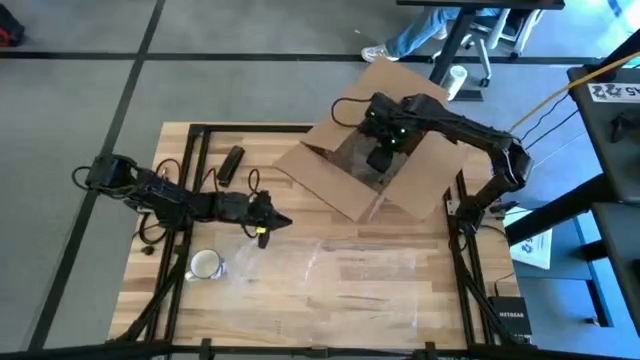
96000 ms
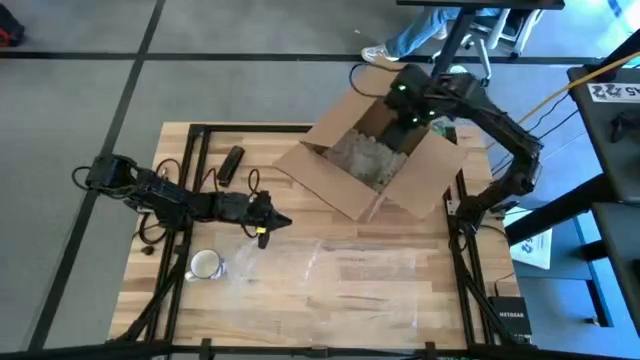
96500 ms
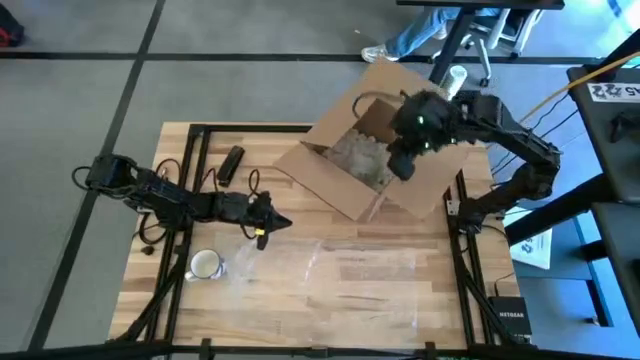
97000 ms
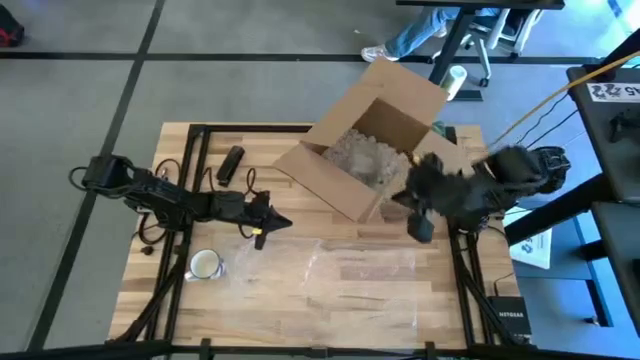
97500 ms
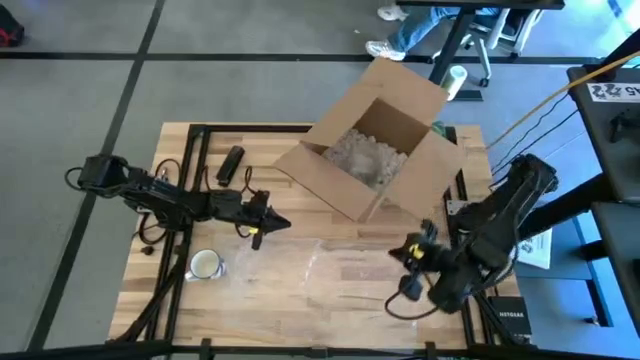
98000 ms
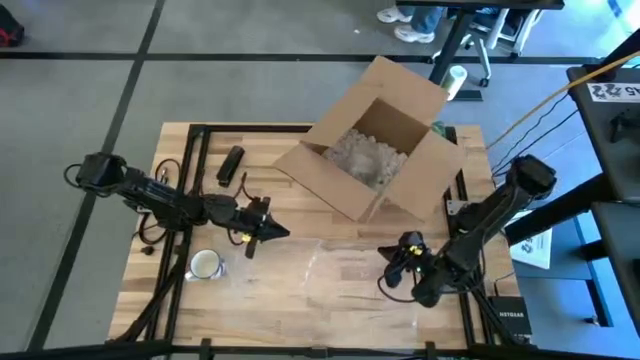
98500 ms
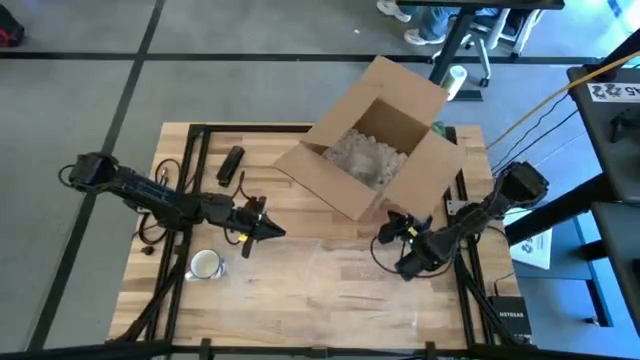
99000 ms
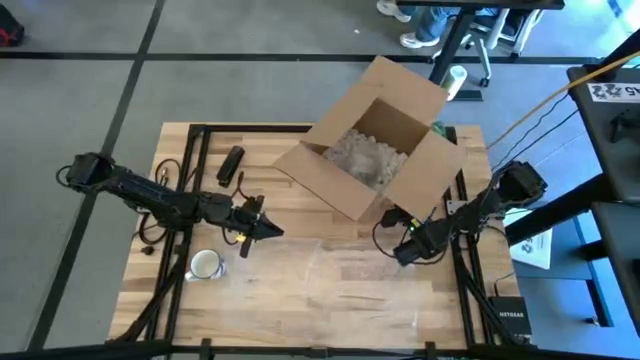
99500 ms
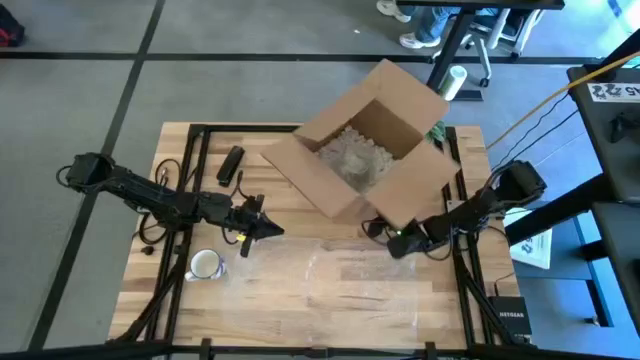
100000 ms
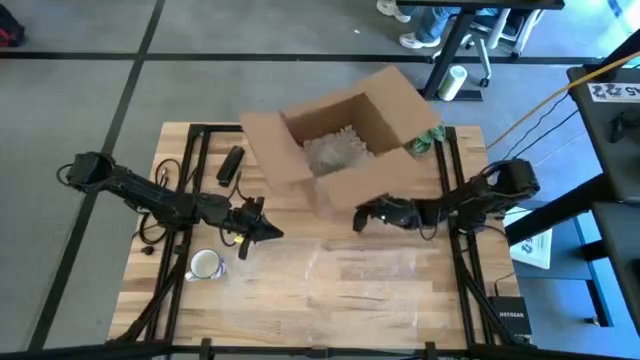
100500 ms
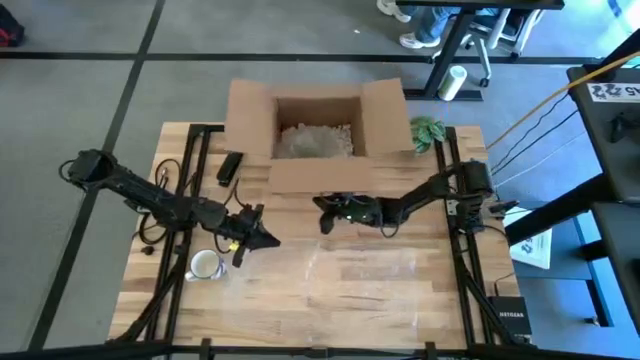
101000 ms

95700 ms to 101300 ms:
Task: wrap mug
Adjust the cardboard box

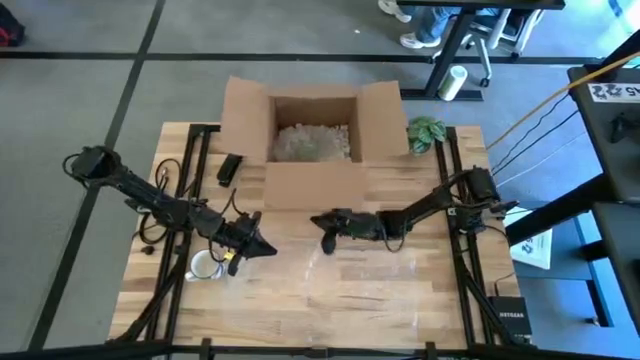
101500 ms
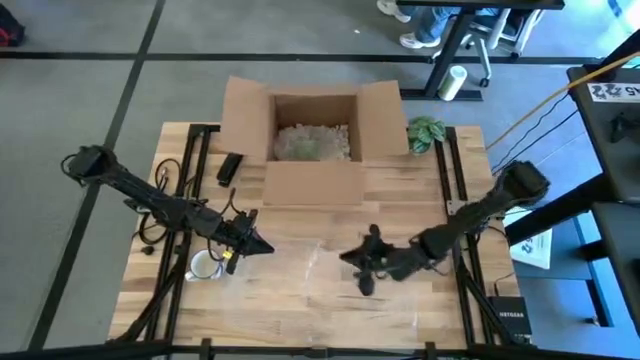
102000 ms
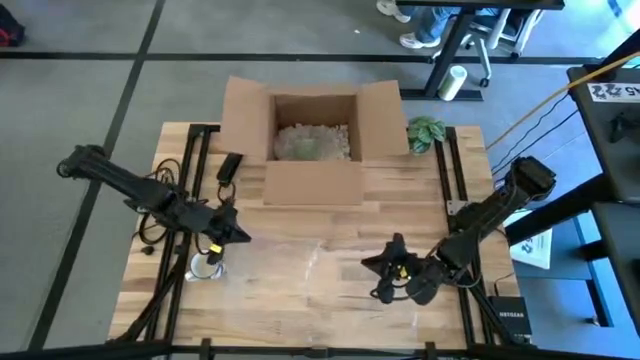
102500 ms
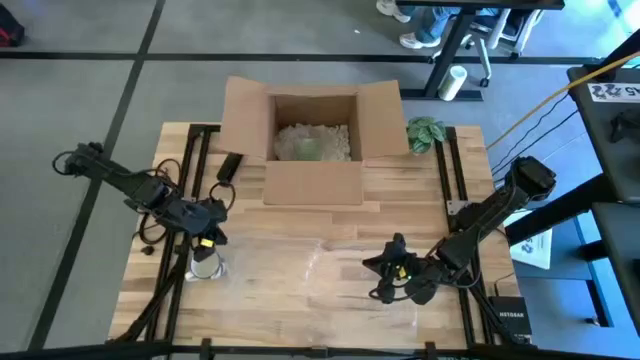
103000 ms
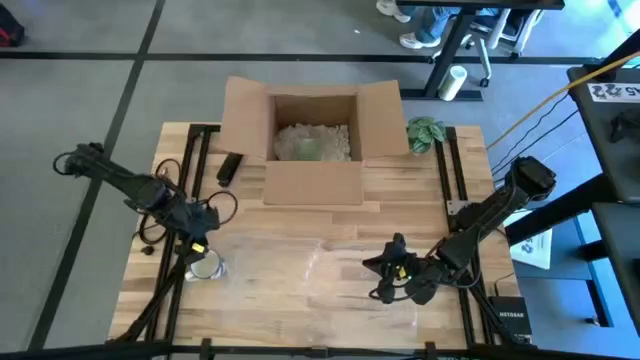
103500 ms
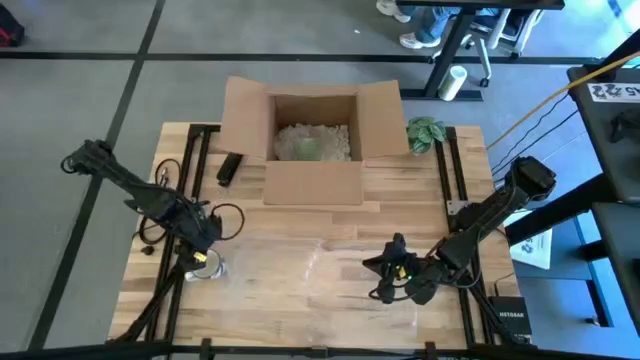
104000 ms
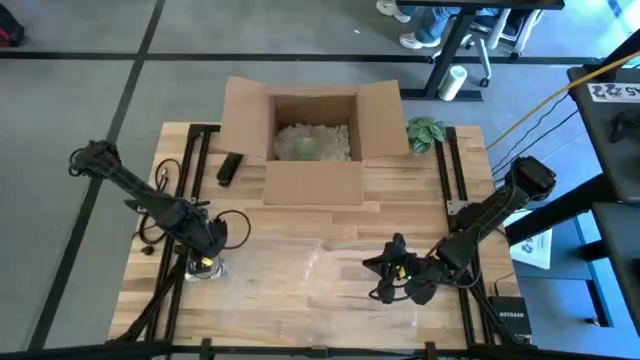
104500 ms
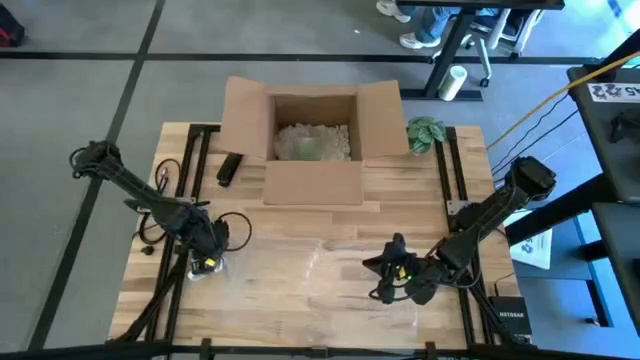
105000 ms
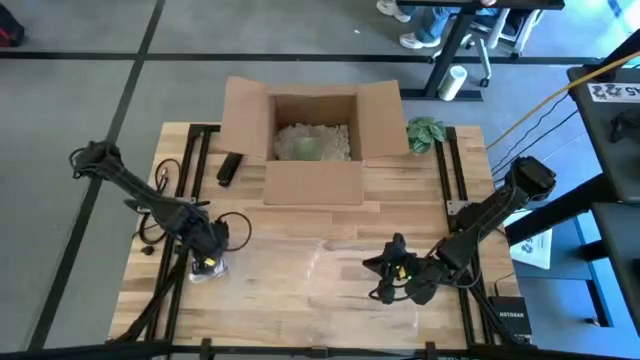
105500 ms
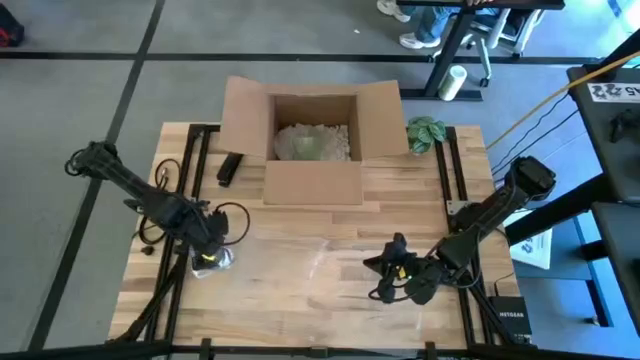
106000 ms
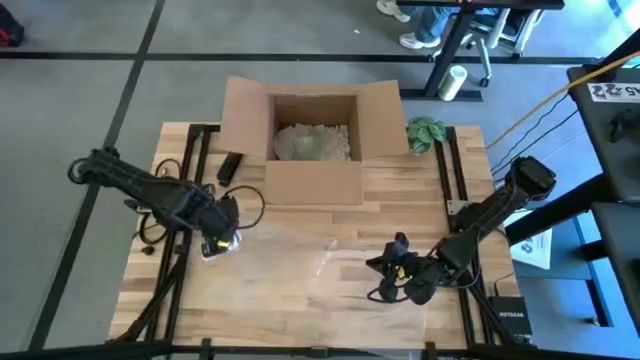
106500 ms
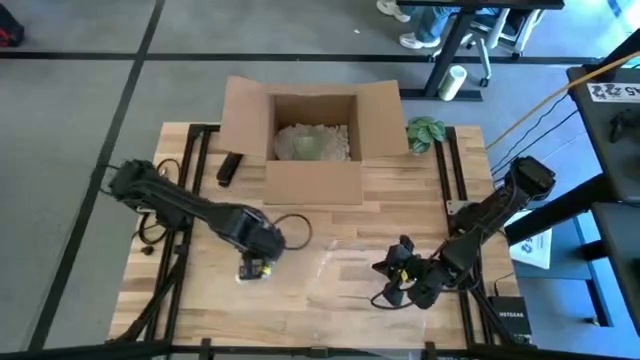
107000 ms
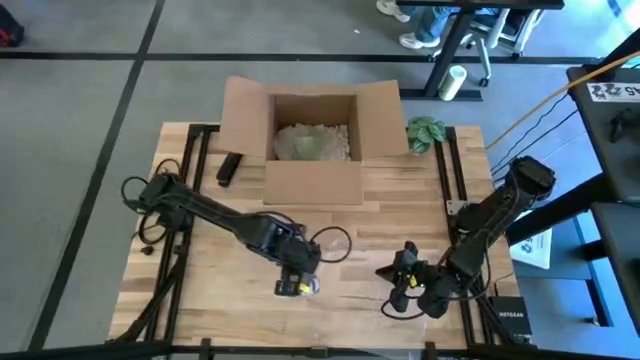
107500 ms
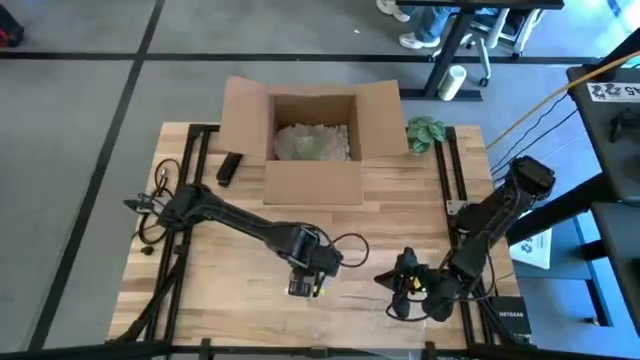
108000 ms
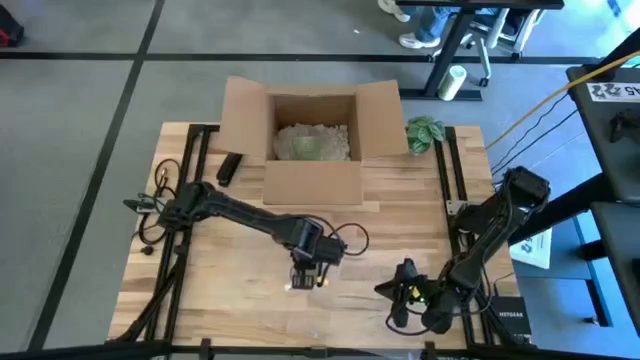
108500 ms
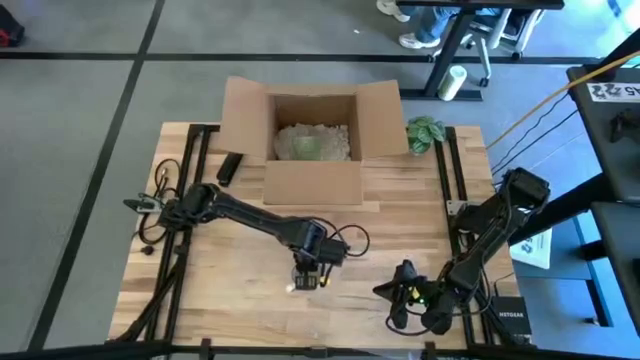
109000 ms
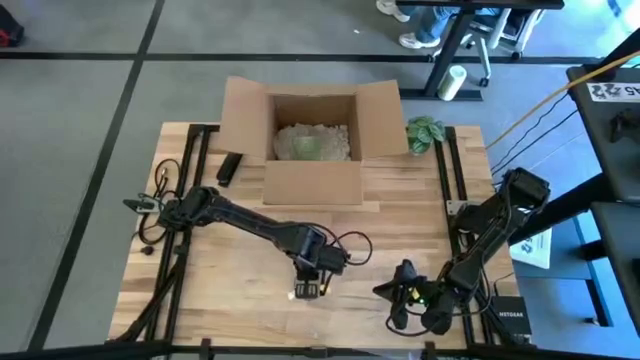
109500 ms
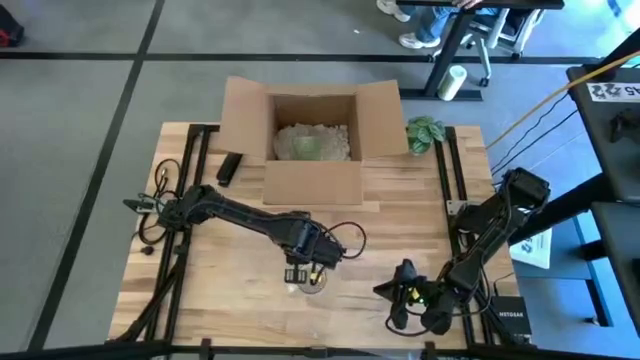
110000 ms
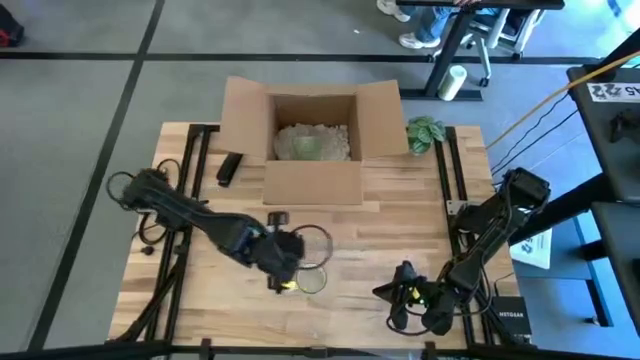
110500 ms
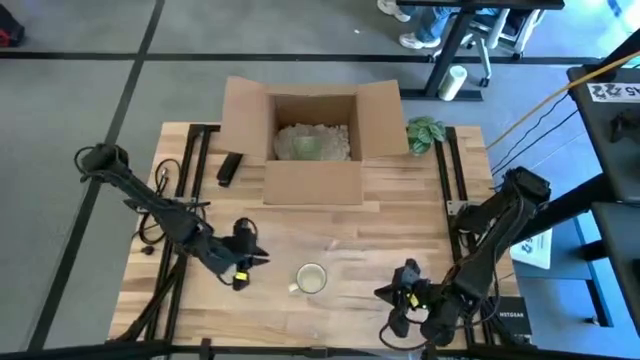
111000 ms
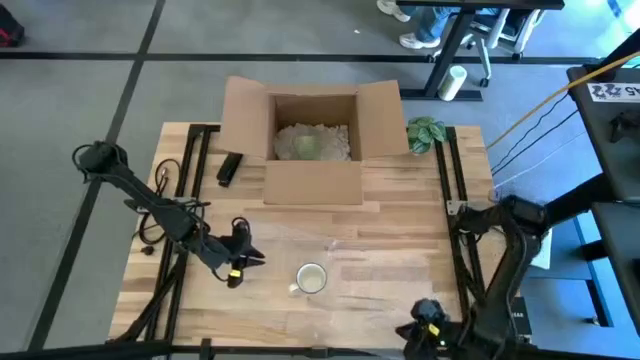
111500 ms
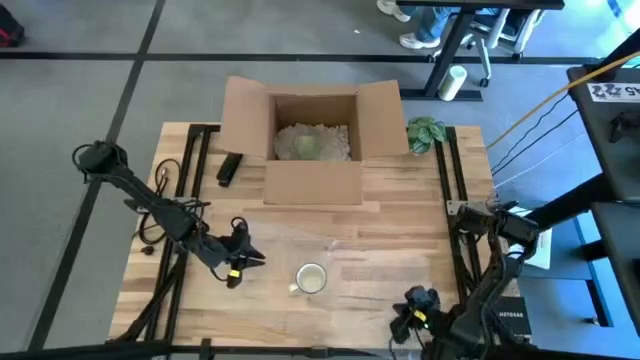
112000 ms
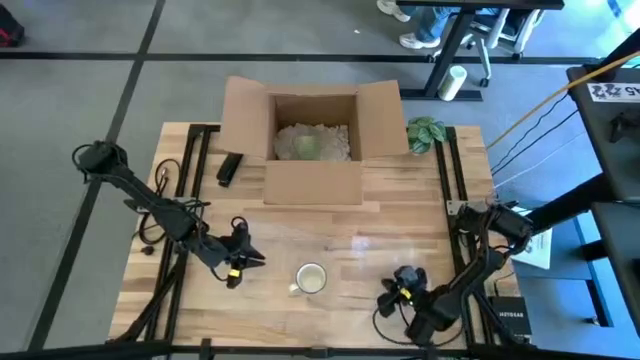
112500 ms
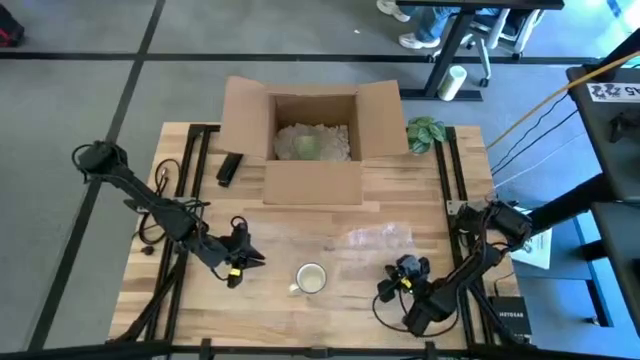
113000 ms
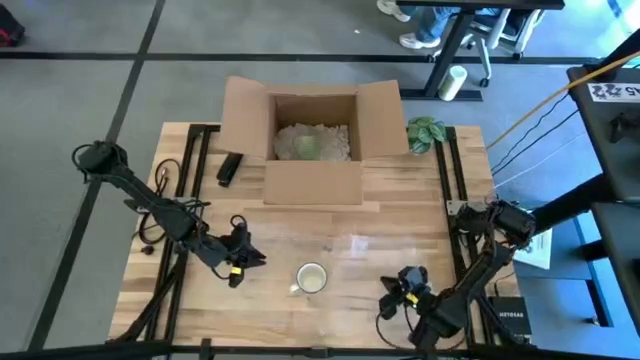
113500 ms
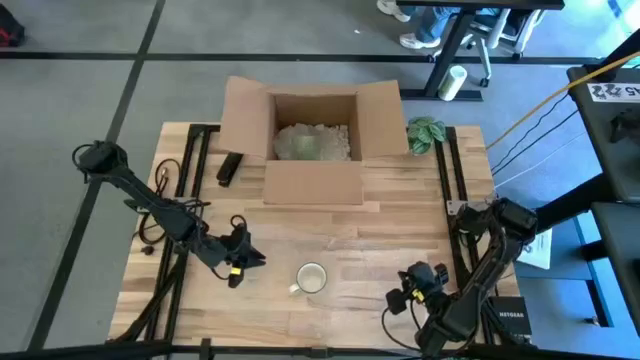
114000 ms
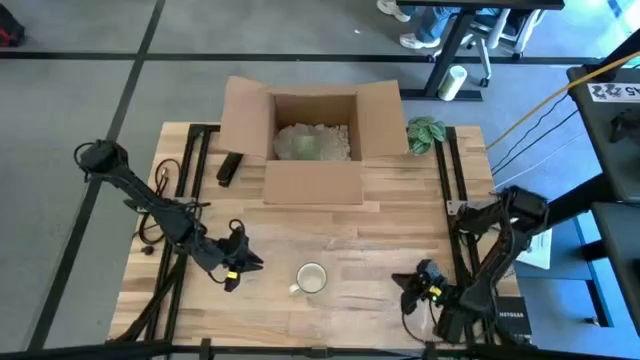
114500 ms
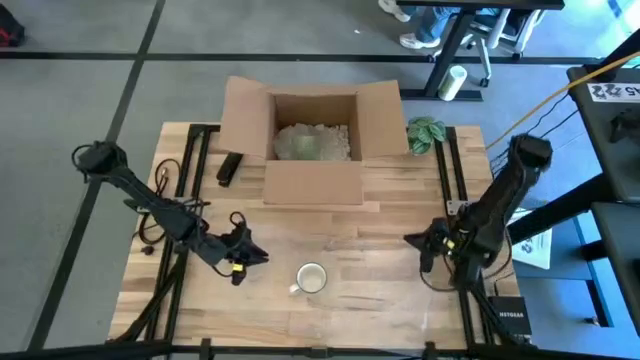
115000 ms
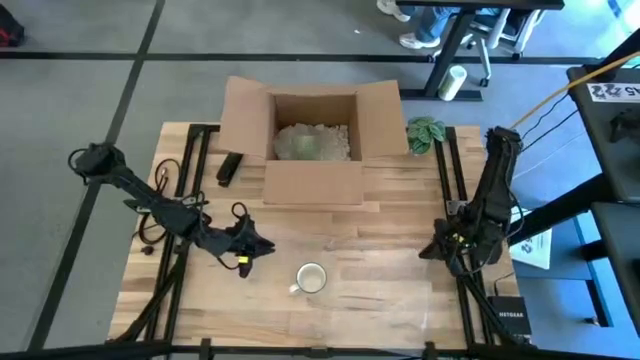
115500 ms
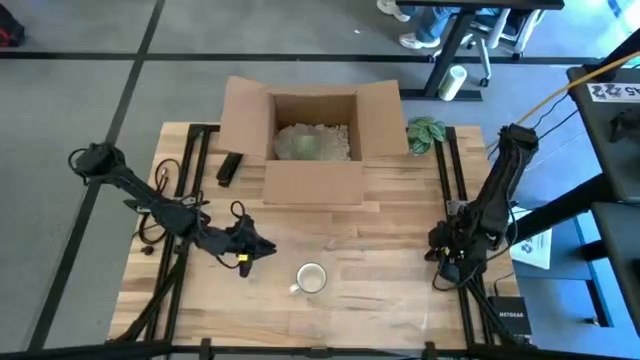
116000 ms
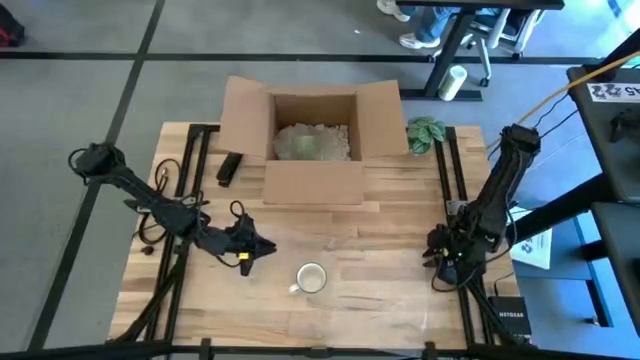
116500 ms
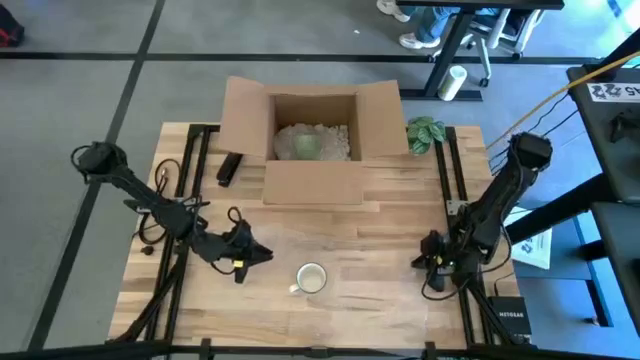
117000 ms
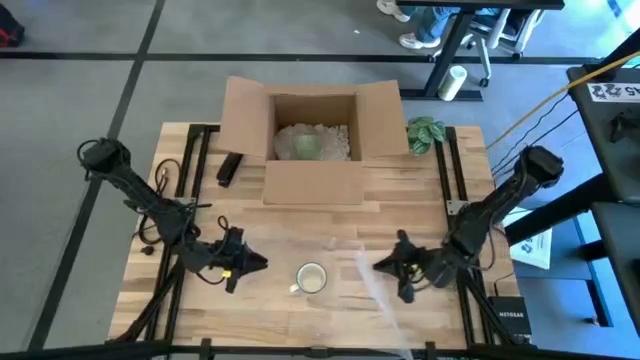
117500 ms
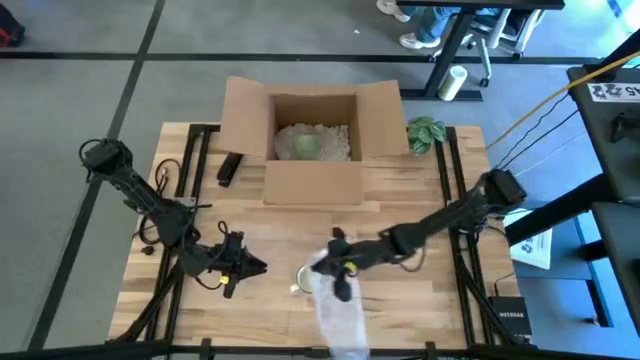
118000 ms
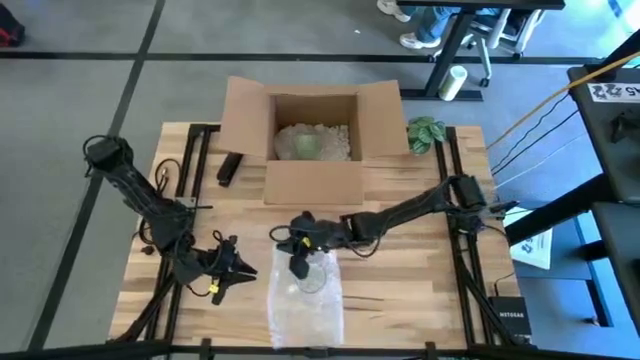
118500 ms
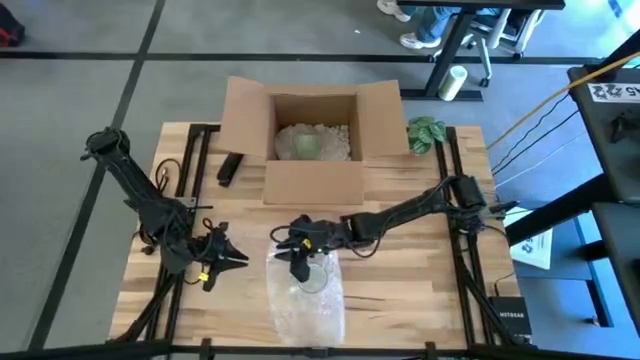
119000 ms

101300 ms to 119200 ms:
Wrap the blue mug with bubble wrap
